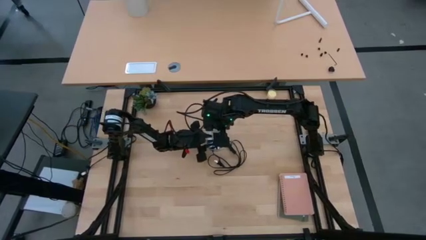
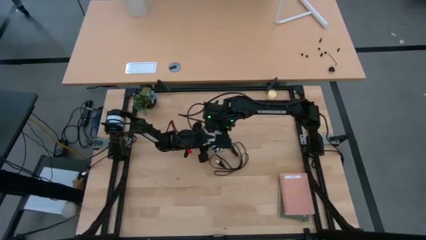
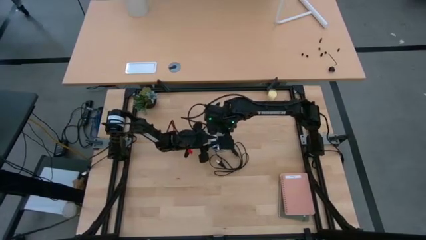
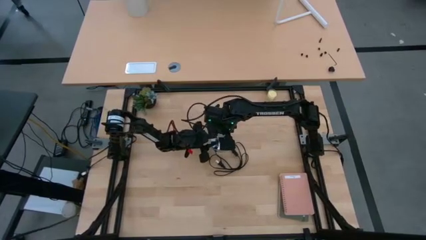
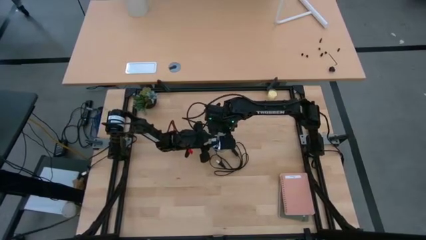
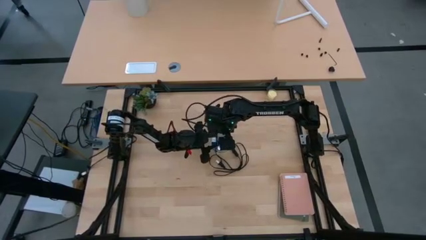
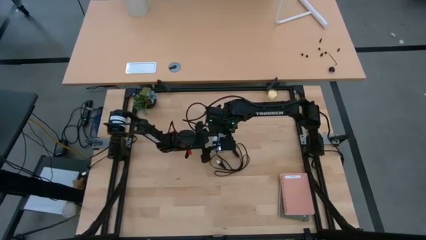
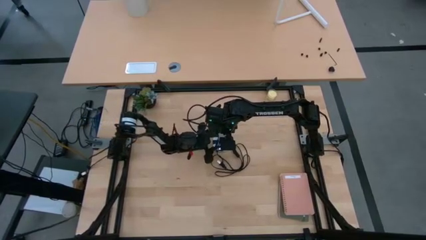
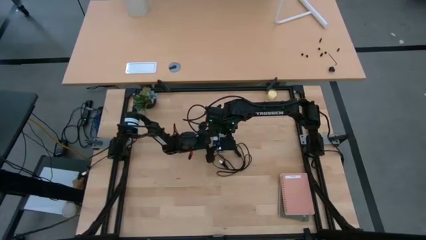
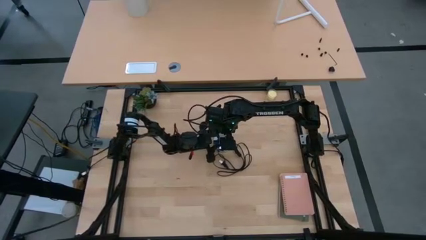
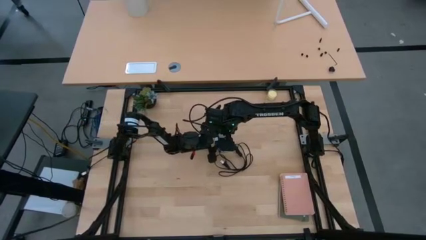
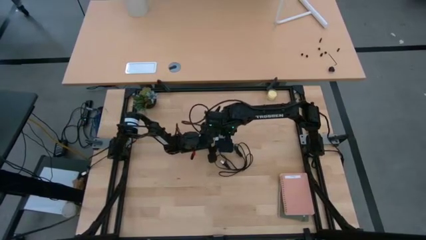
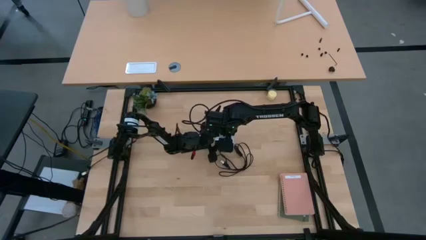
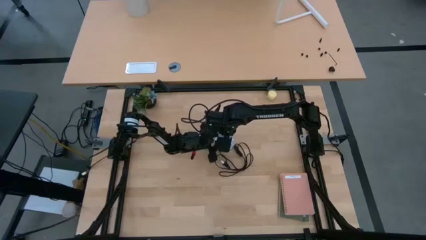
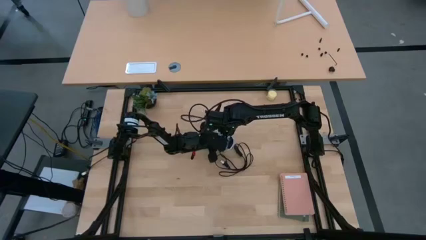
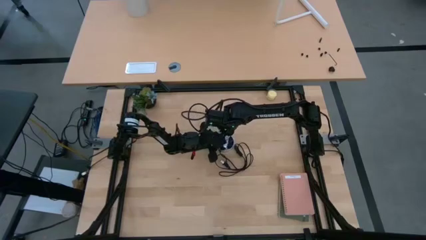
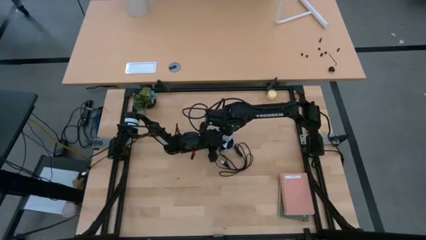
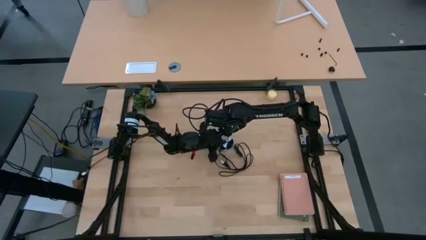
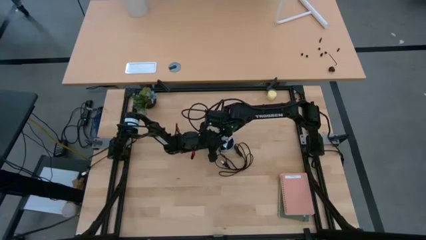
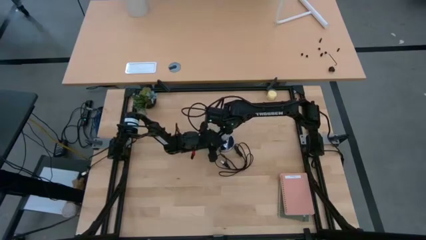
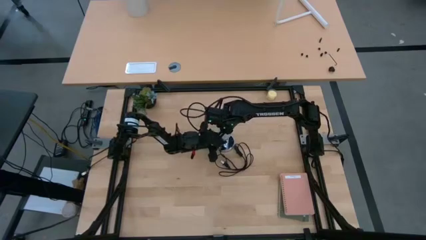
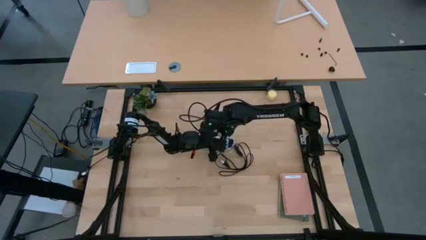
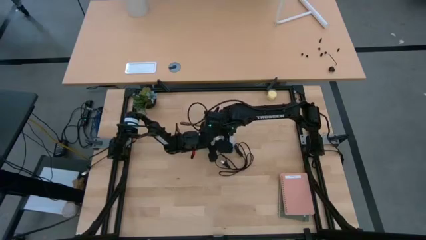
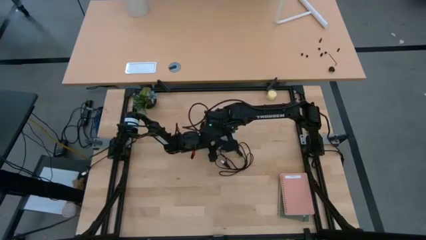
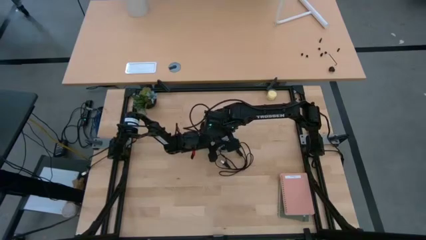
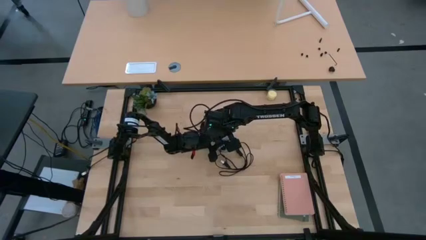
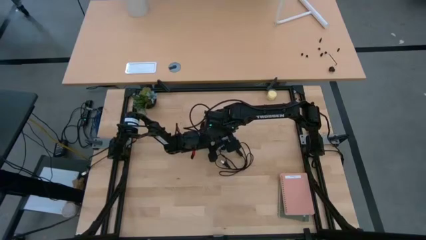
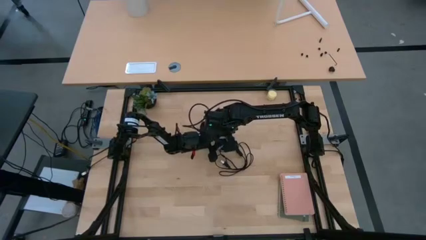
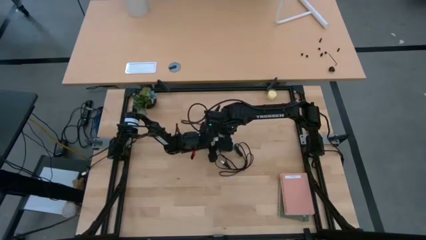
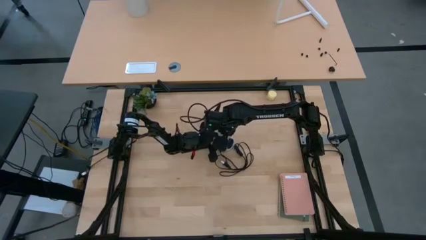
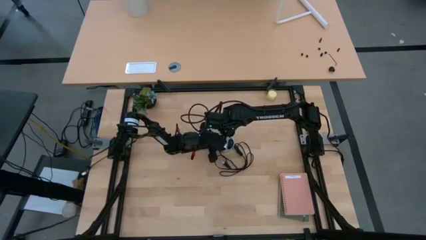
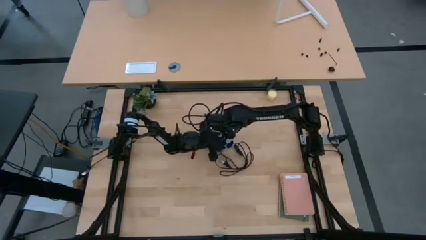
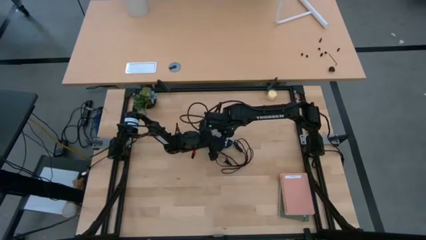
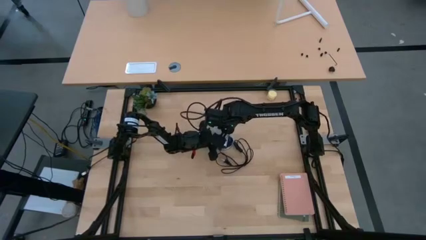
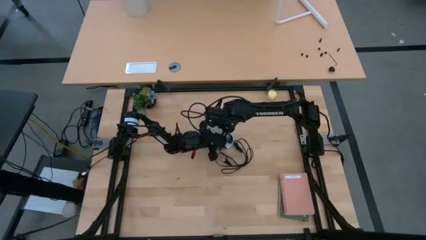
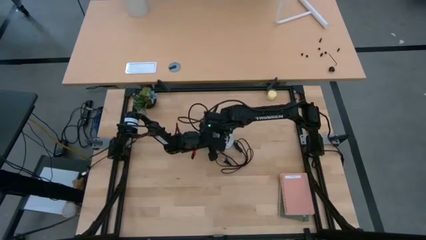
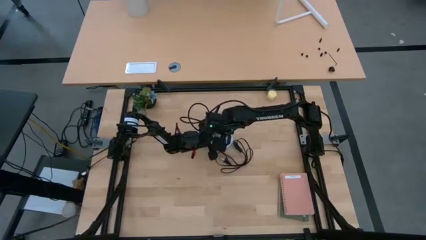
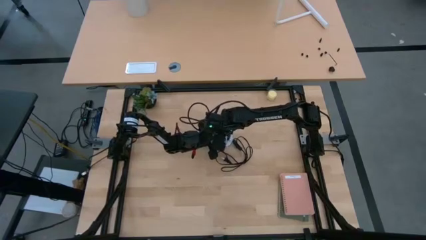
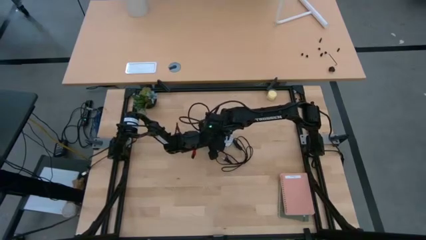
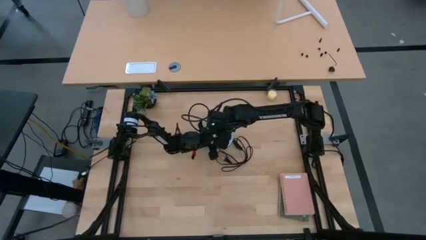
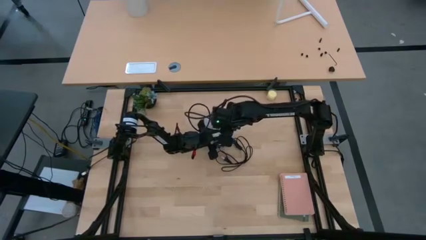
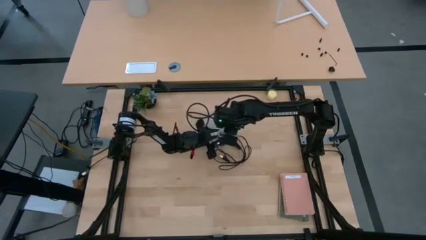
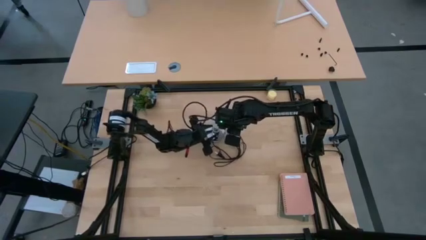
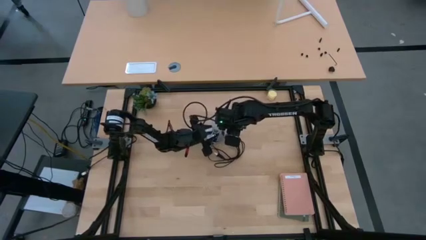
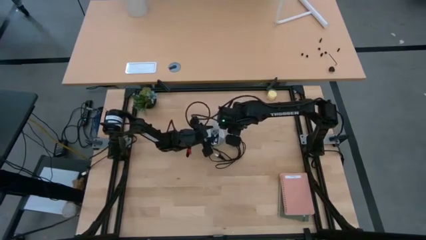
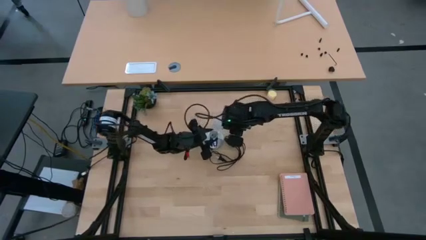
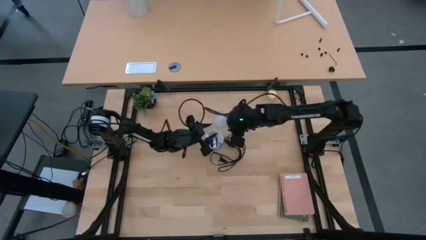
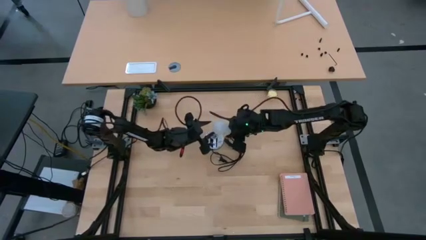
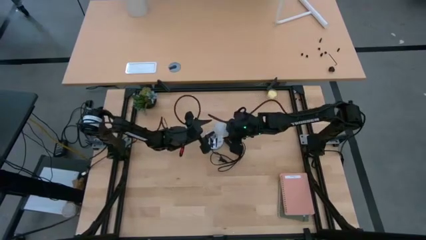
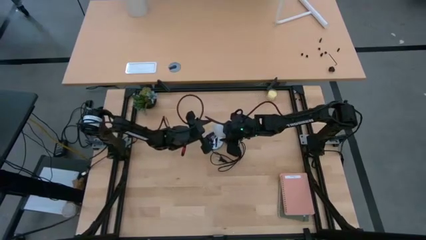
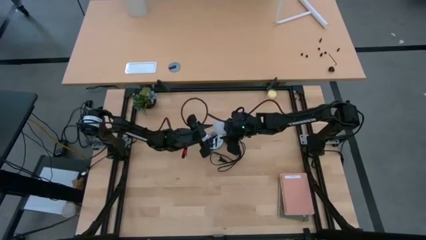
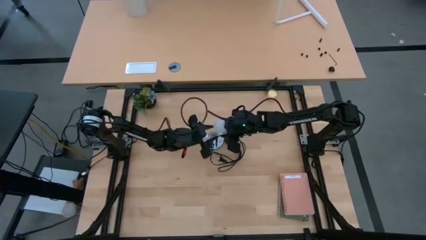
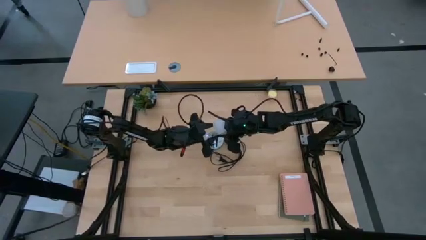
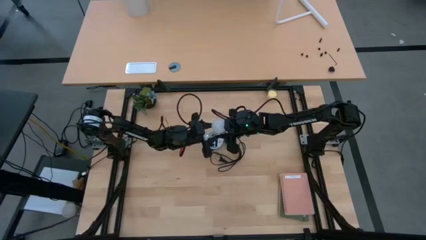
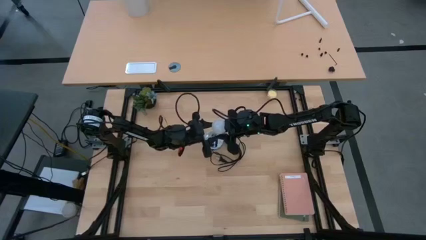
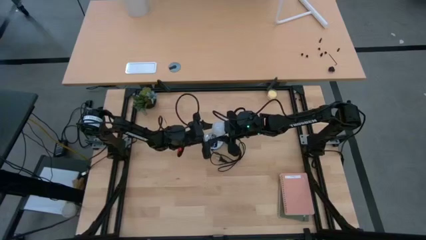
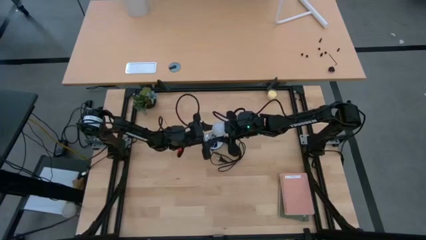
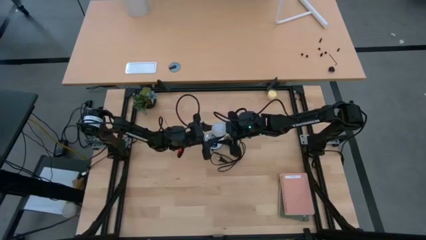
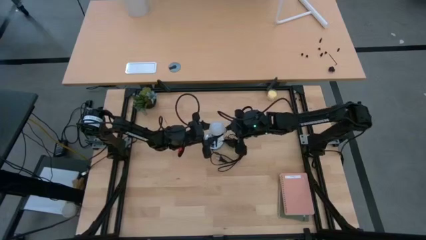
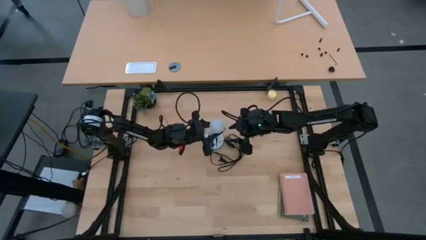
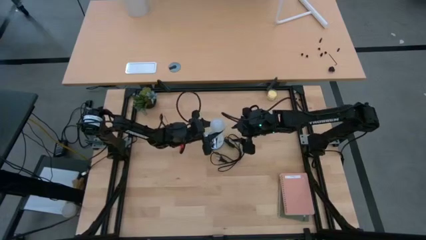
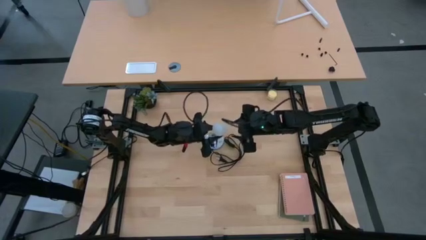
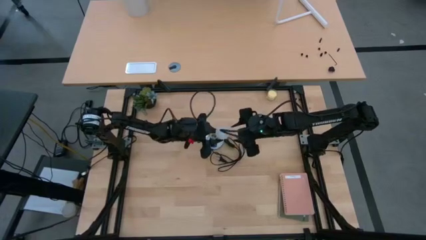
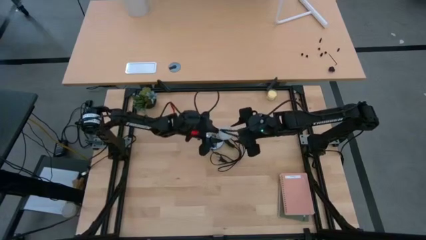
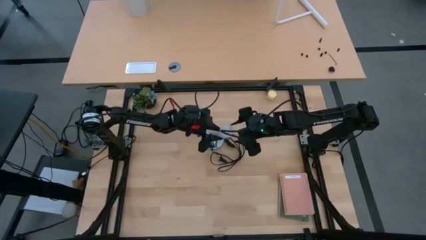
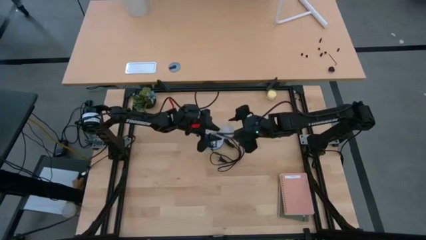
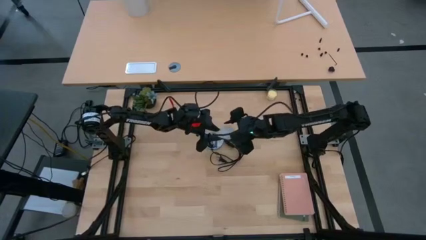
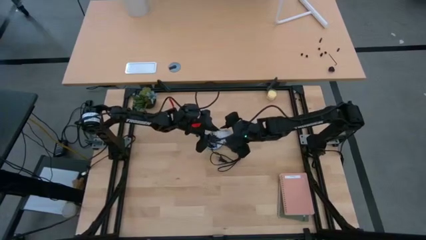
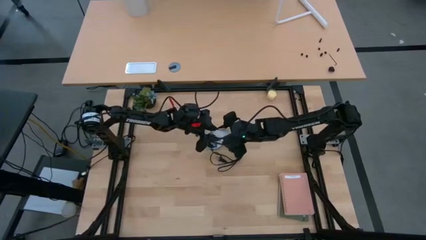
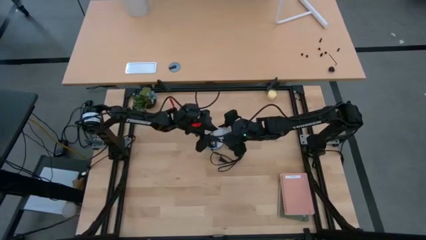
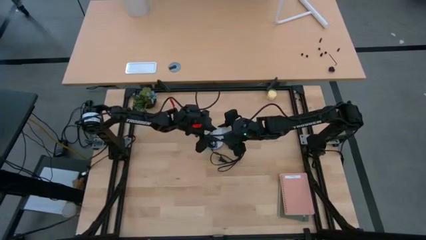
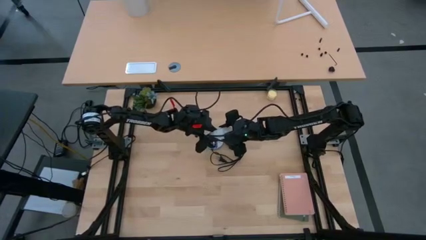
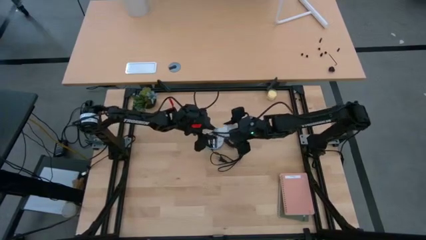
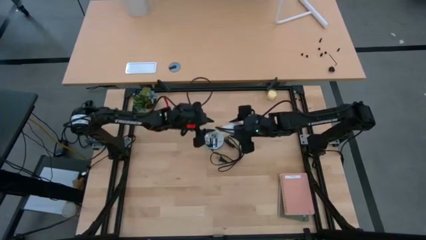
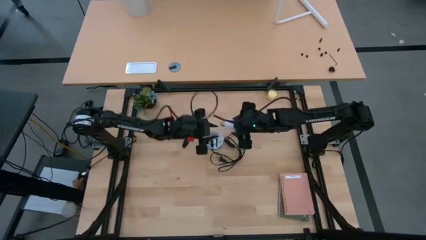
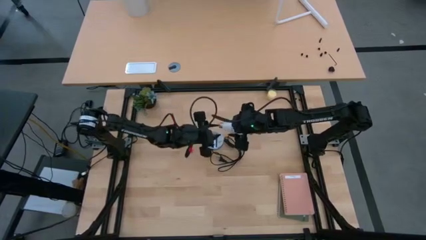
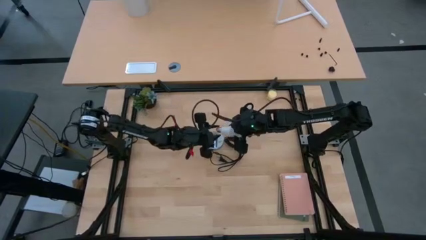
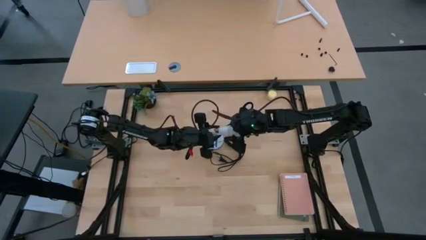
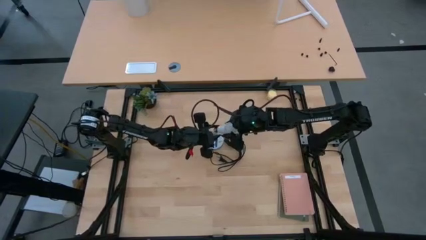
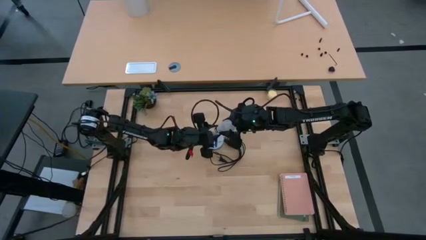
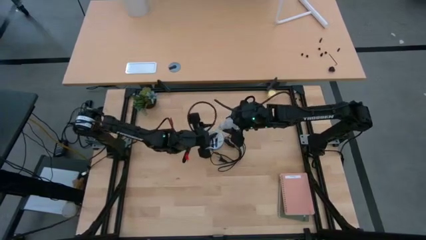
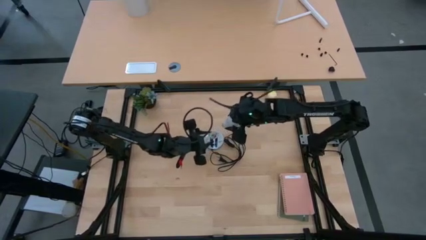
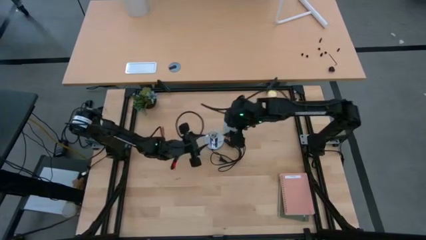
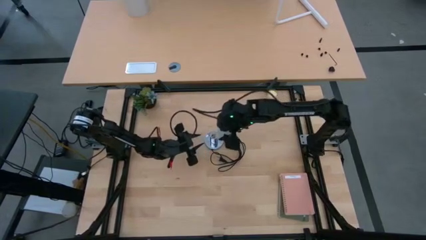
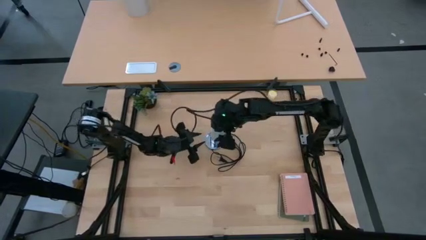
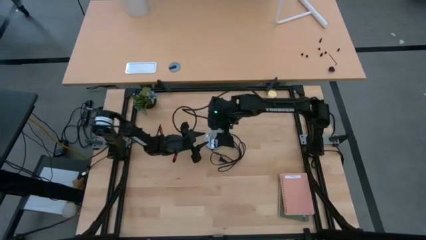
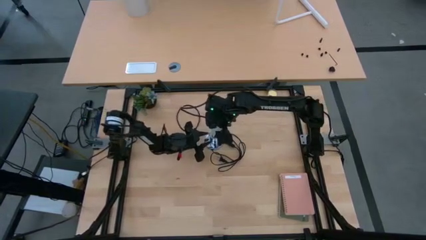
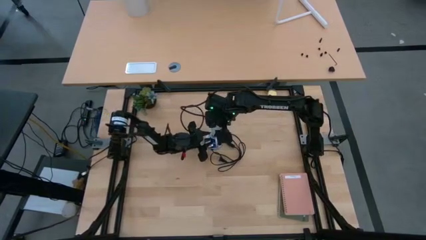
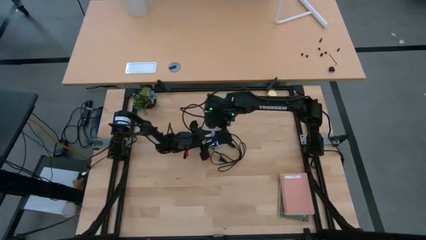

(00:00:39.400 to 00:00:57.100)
Task: Screw lightbulb
Insert the lightbulb into the lamp
